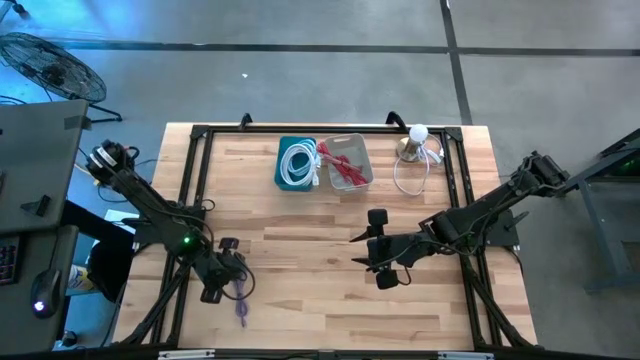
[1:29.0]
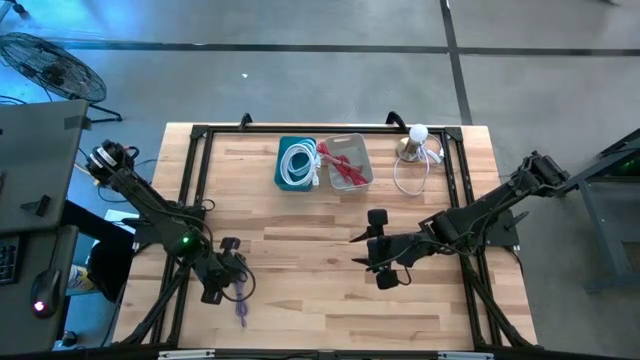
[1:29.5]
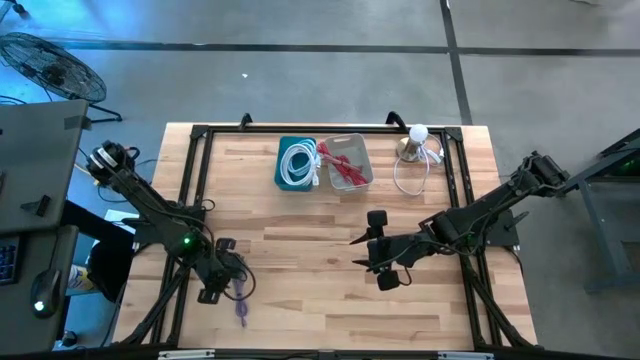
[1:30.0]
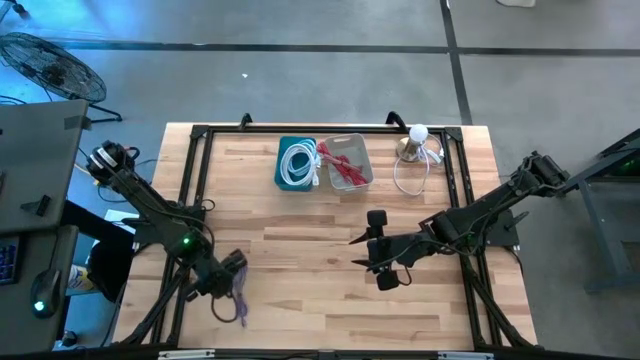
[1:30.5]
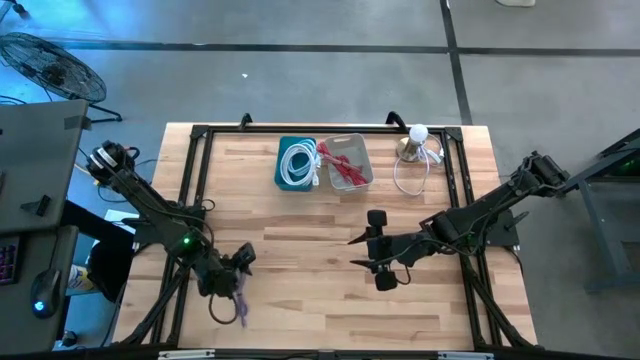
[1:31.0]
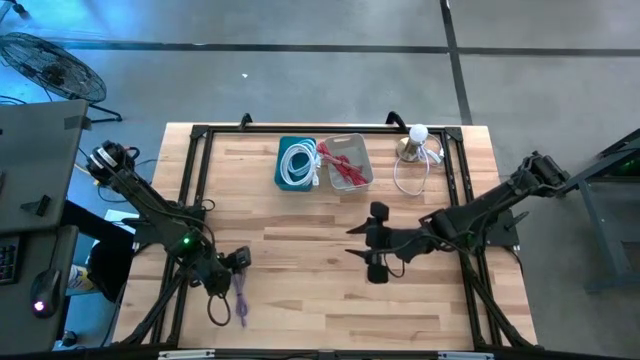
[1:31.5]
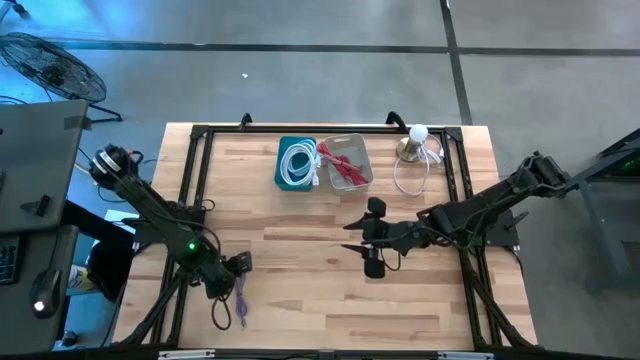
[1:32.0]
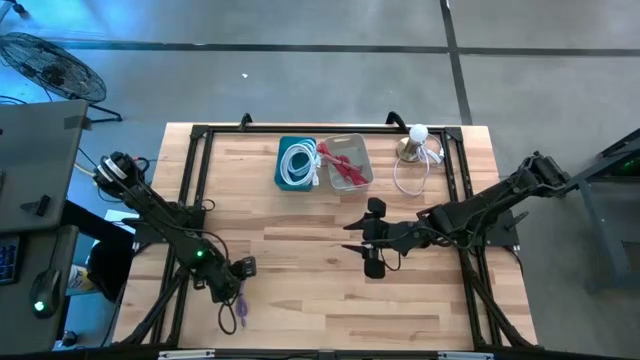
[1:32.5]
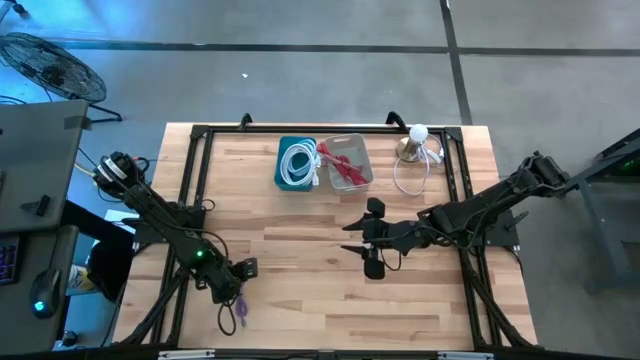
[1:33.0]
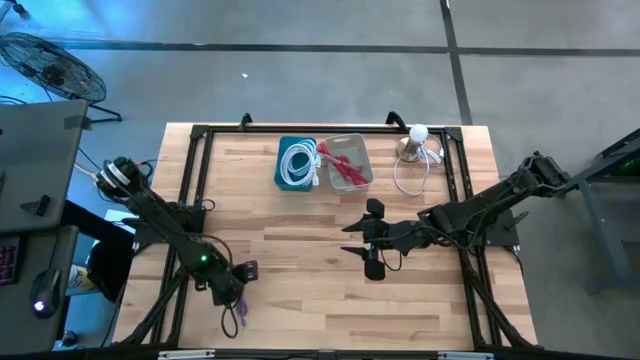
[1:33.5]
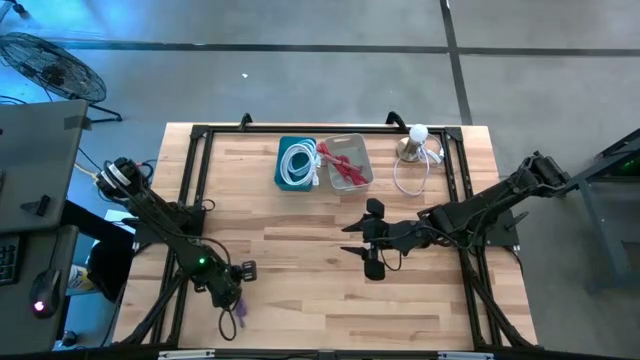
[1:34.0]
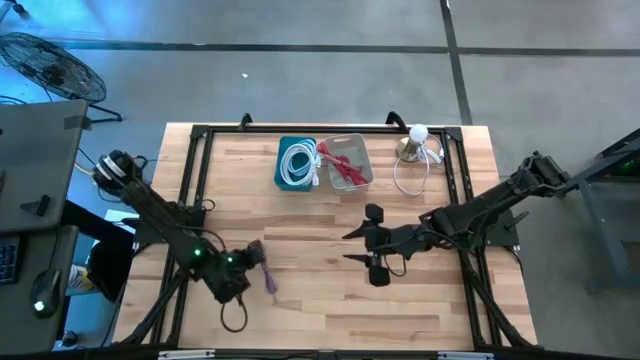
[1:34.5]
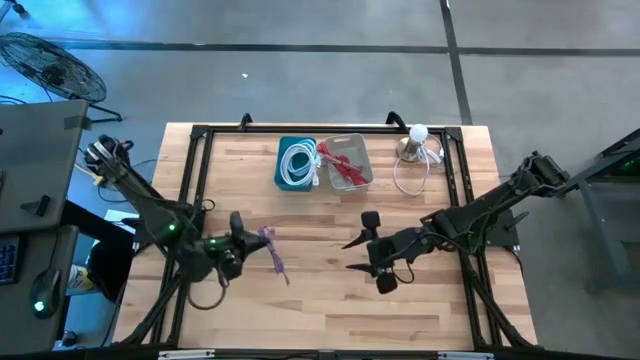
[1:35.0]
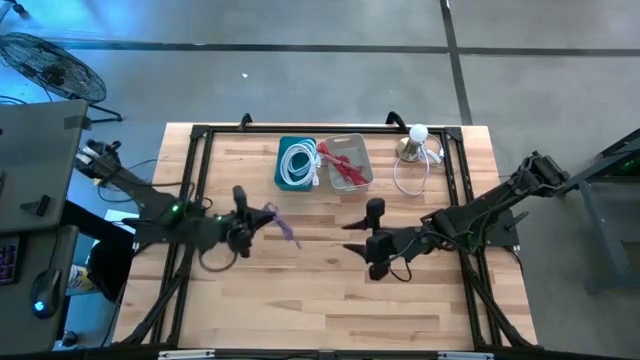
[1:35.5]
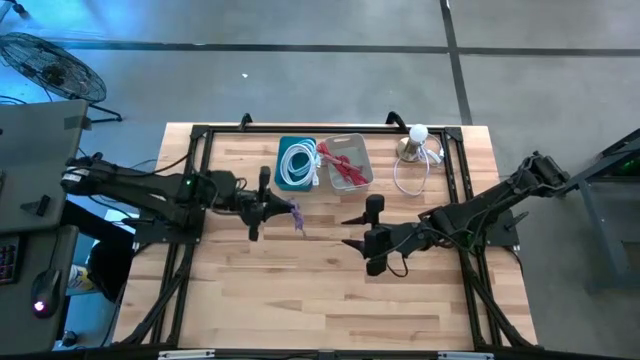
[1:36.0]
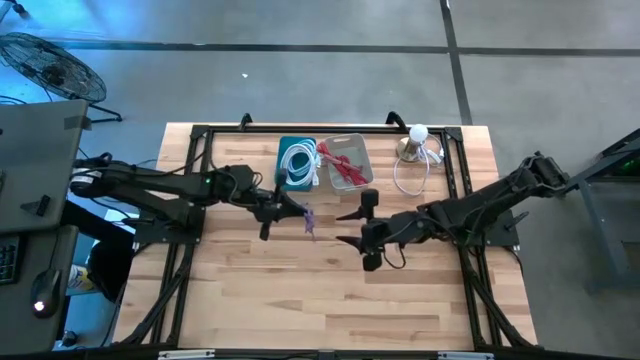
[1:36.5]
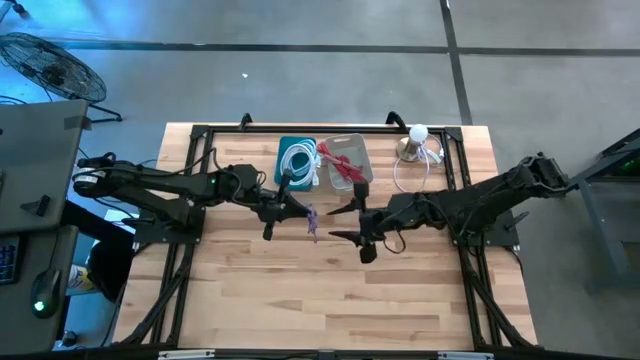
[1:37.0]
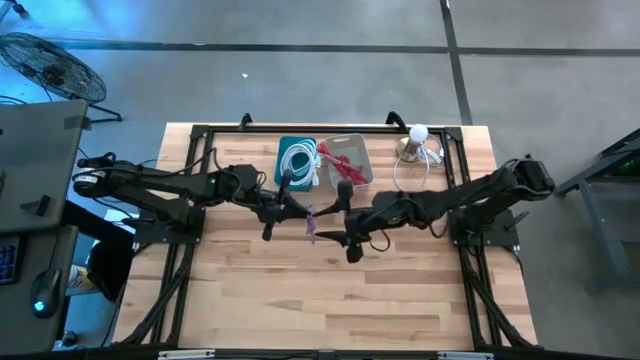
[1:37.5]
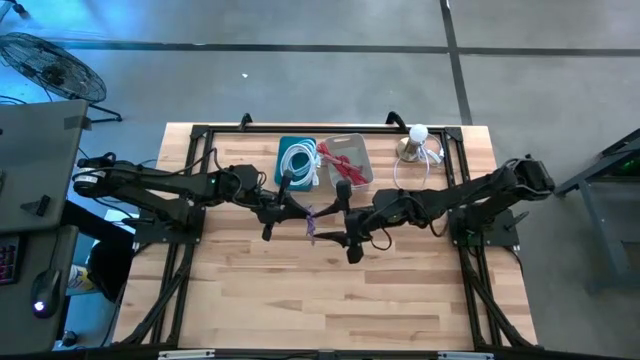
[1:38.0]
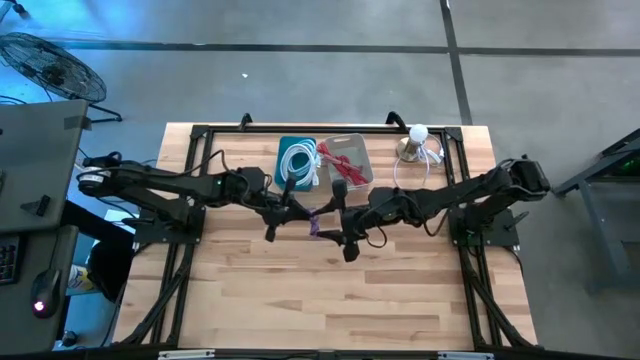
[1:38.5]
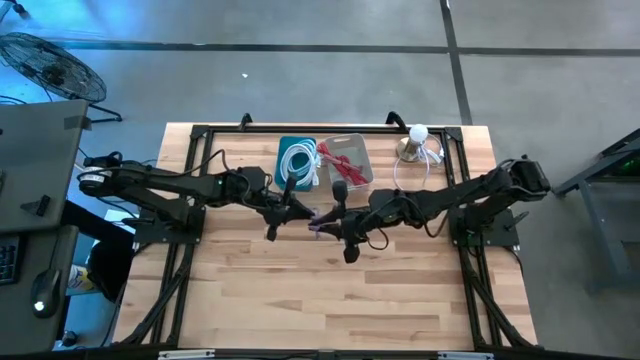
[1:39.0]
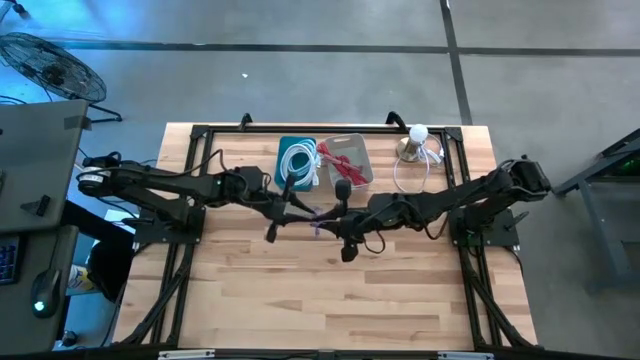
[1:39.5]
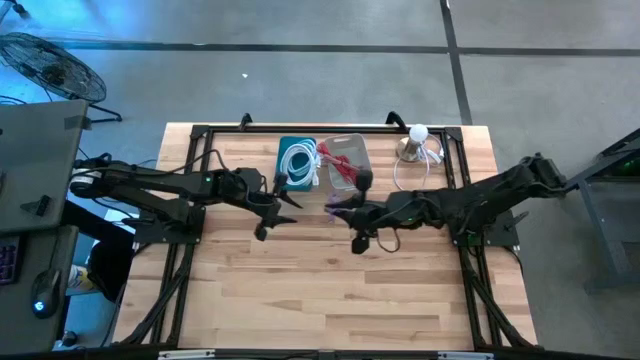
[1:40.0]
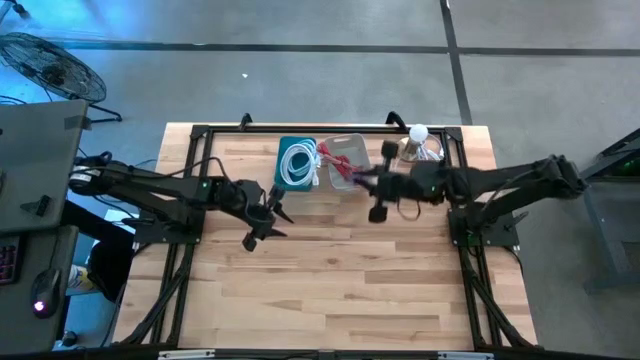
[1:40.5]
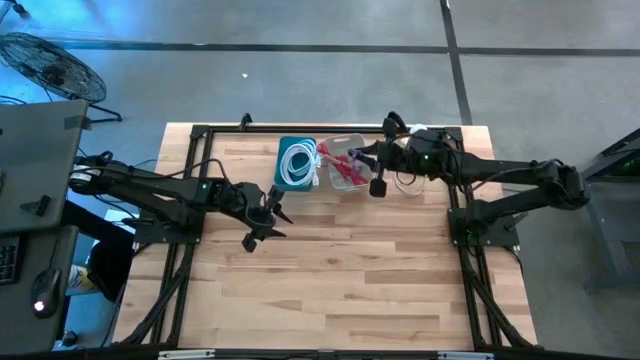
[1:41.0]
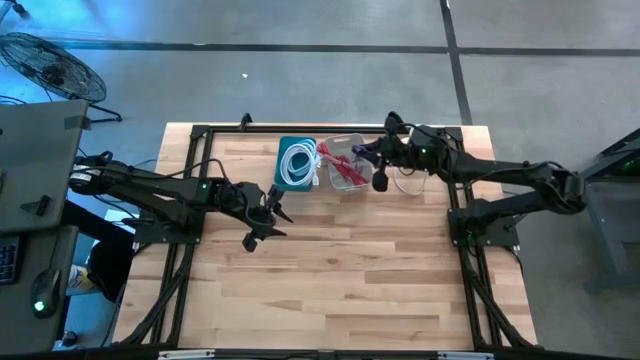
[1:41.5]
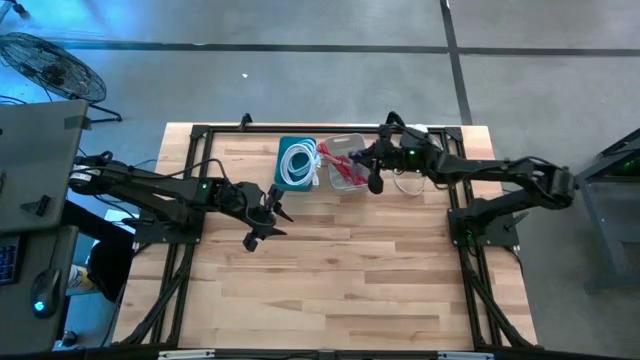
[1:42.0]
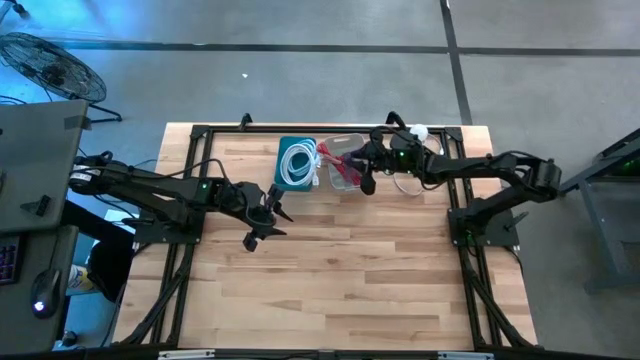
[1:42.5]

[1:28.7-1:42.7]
Task: Pick & Place USB Port
Put the purple charger cable into the gray bin

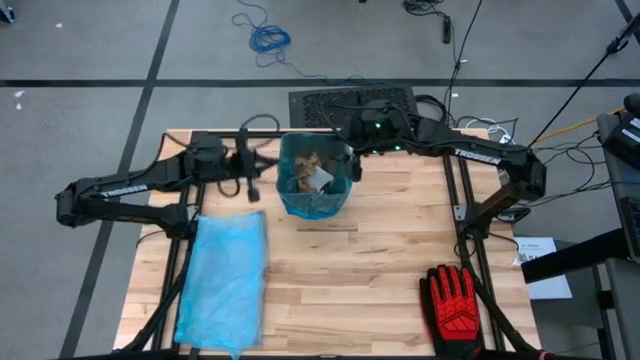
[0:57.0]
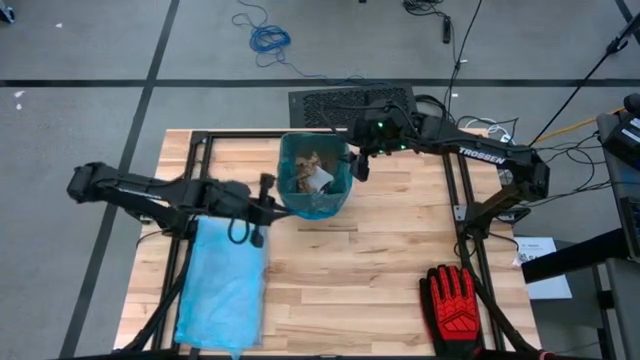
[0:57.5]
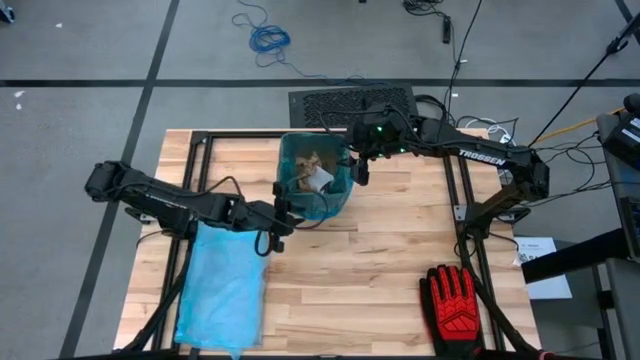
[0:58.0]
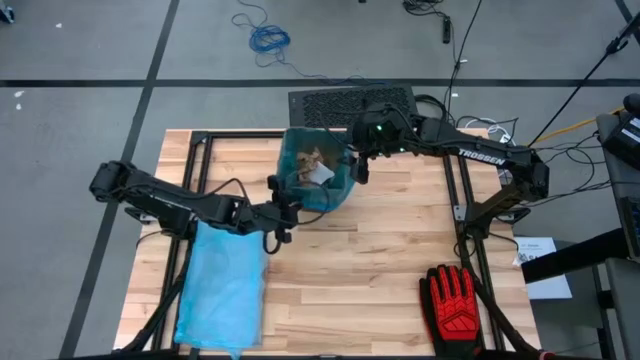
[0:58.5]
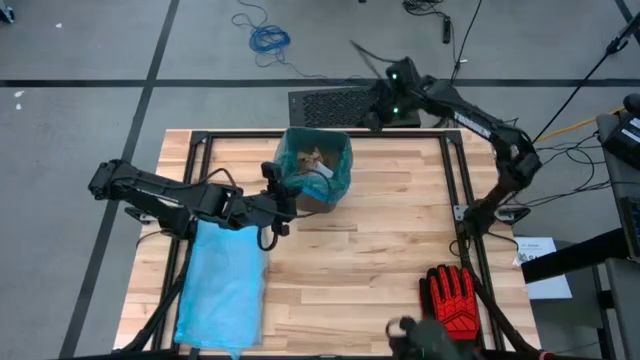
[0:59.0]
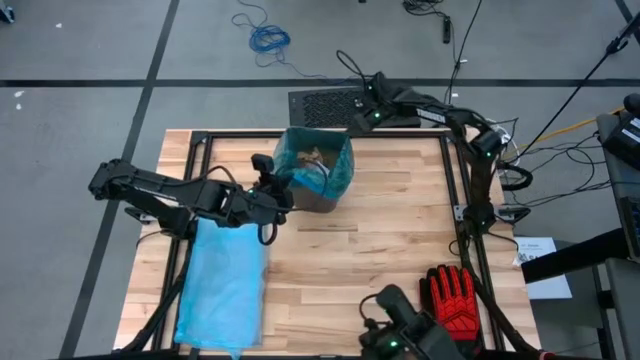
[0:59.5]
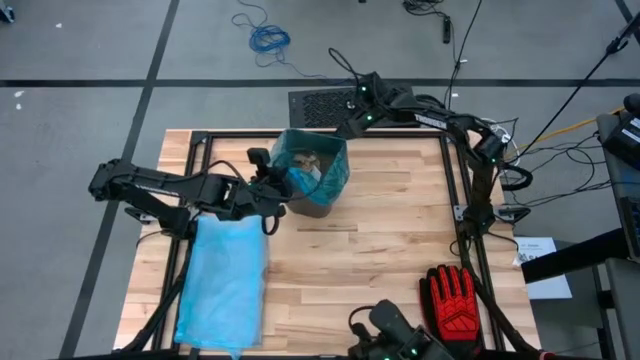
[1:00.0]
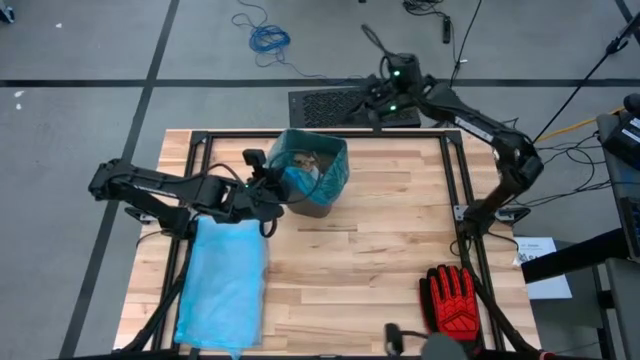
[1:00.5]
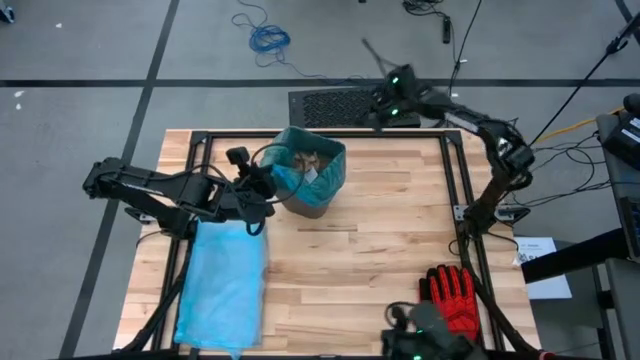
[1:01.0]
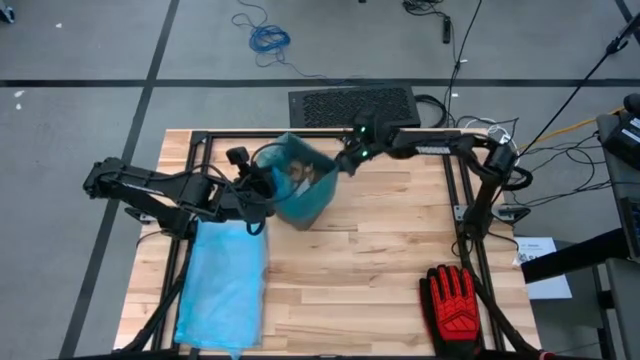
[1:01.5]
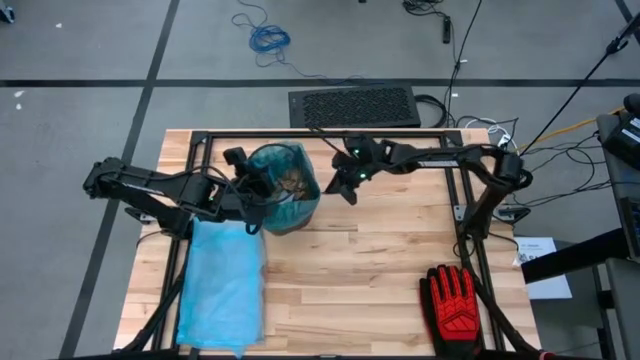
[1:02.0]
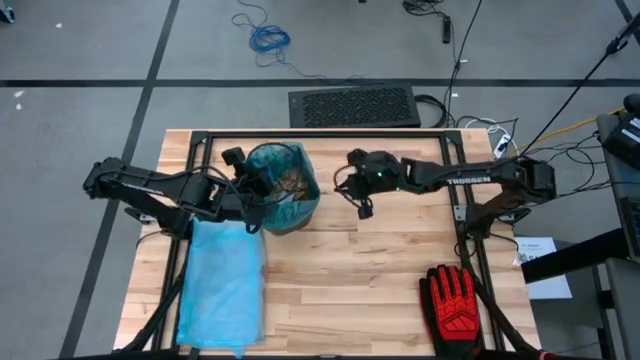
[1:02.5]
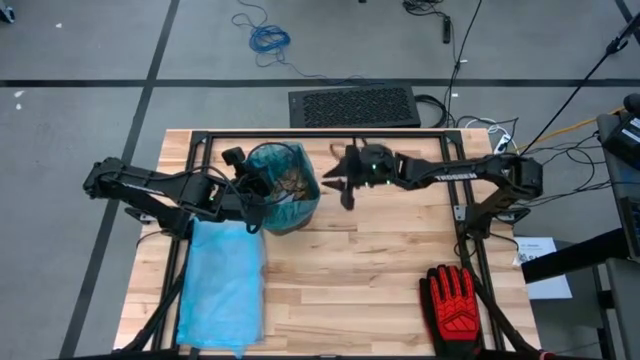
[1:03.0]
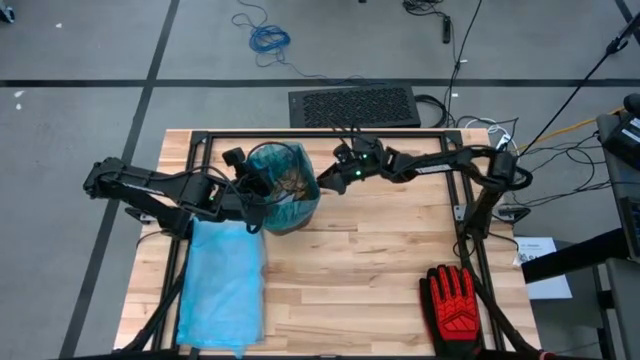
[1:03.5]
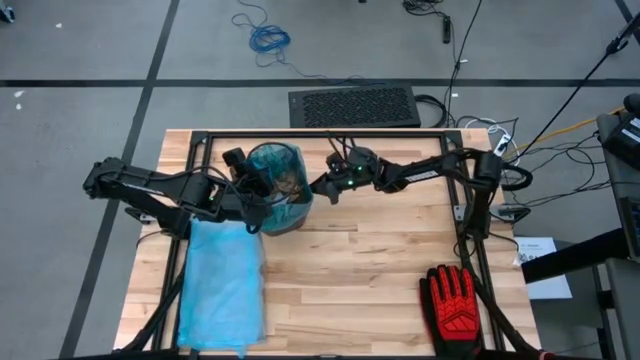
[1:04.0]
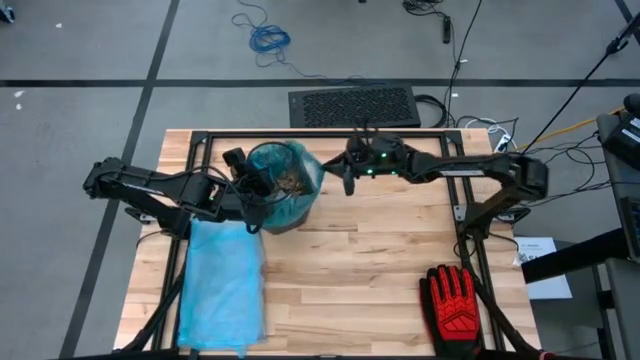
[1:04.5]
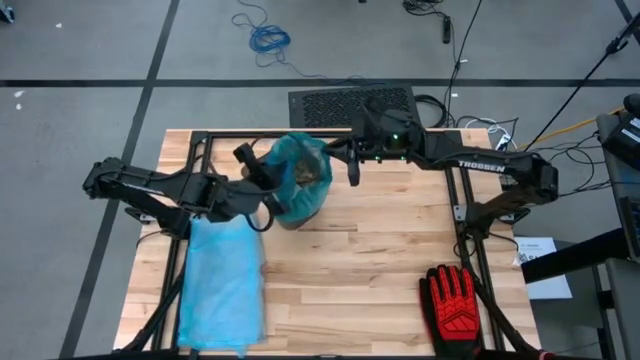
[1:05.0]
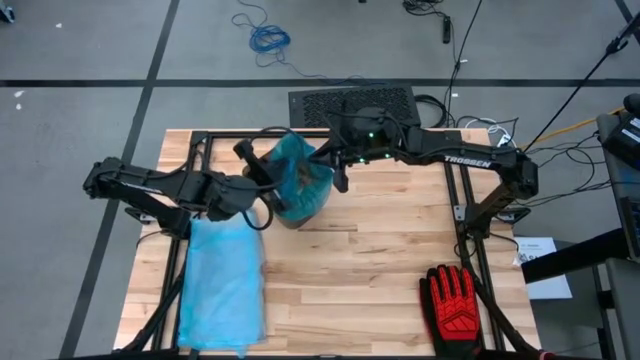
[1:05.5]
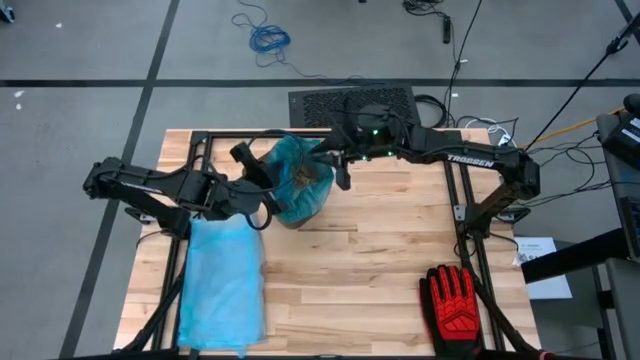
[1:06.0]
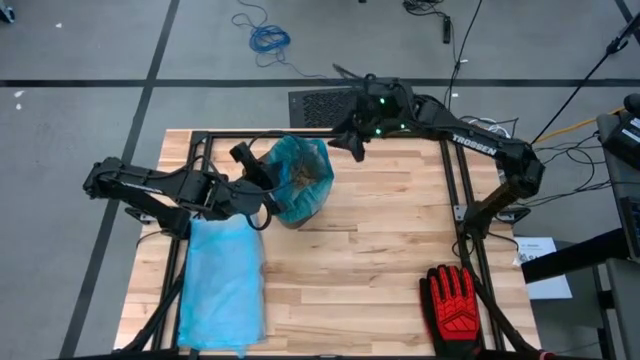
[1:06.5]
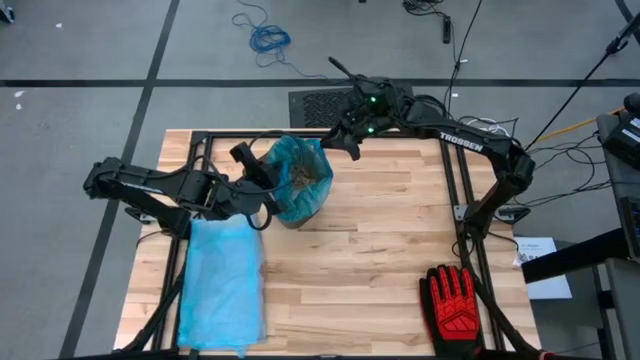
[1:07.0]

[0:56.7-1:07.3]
Task: place trash/remove bag and relplace
Remove the blue trash bag from the black trash bin
